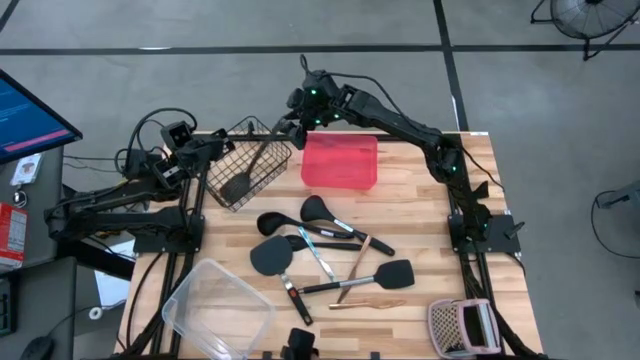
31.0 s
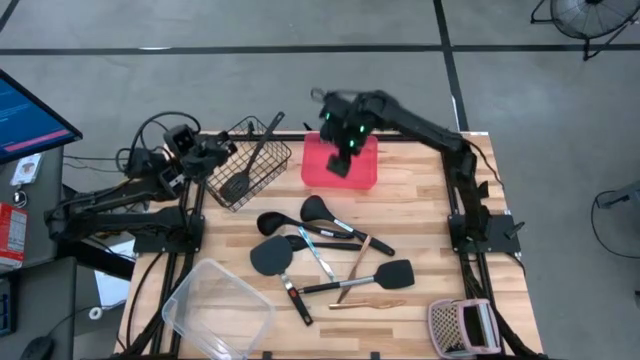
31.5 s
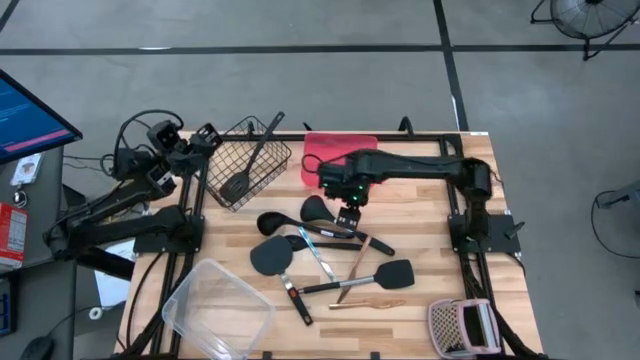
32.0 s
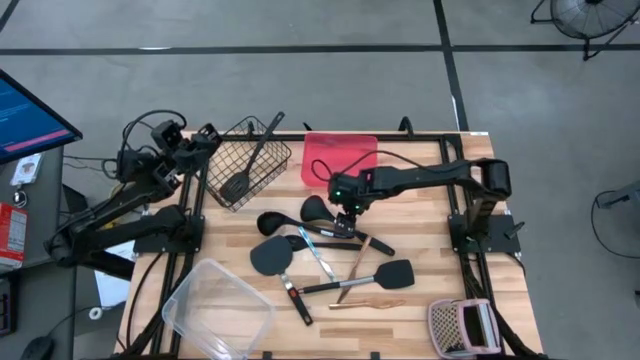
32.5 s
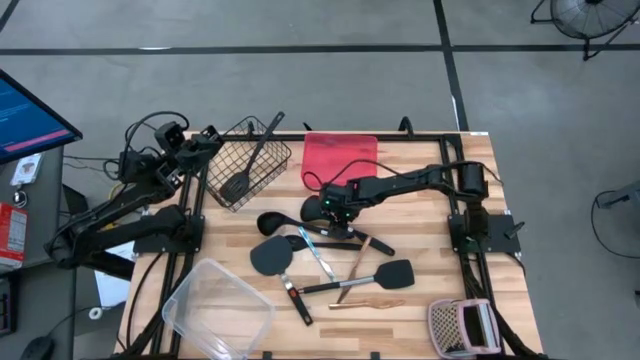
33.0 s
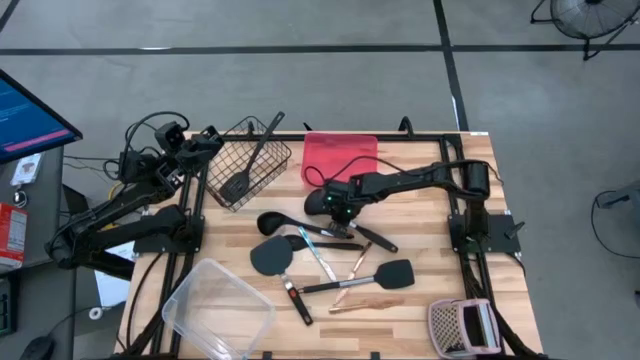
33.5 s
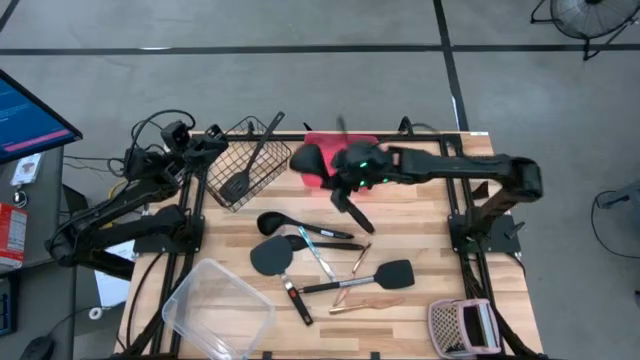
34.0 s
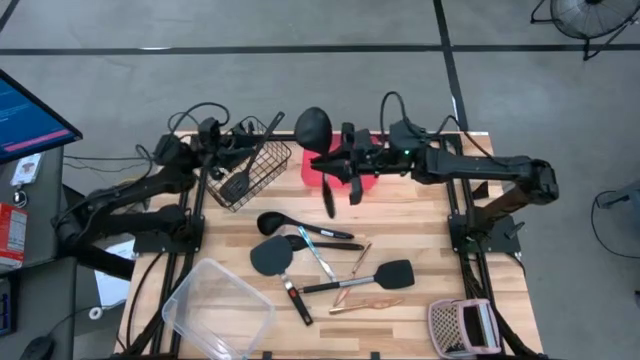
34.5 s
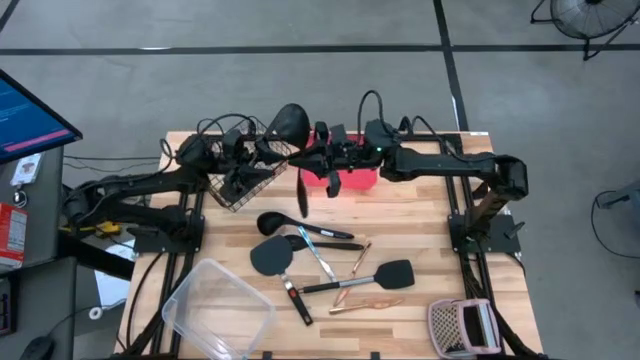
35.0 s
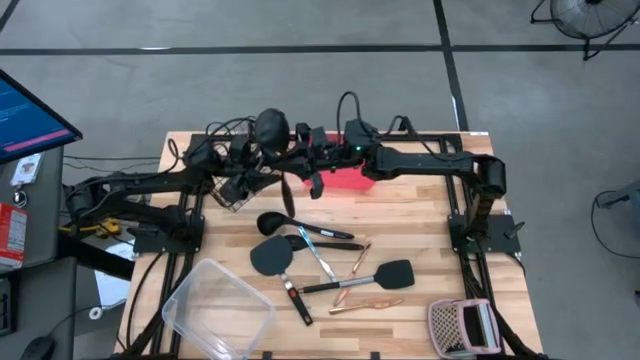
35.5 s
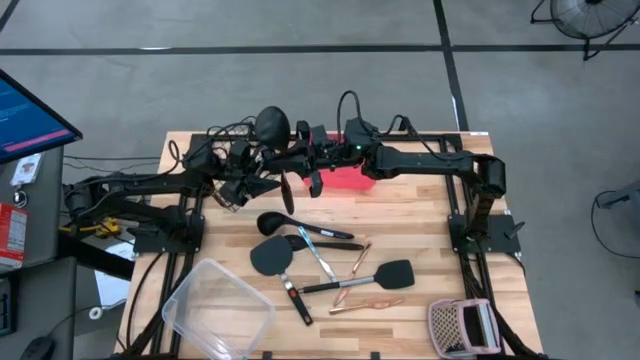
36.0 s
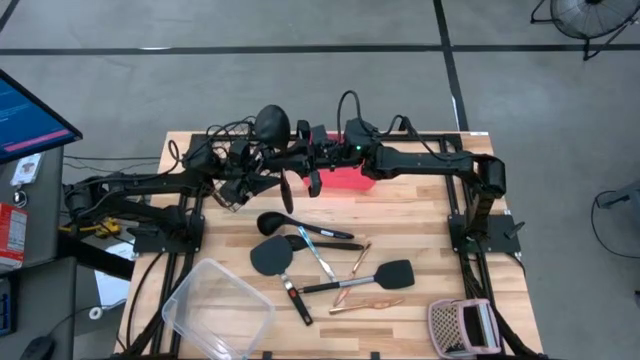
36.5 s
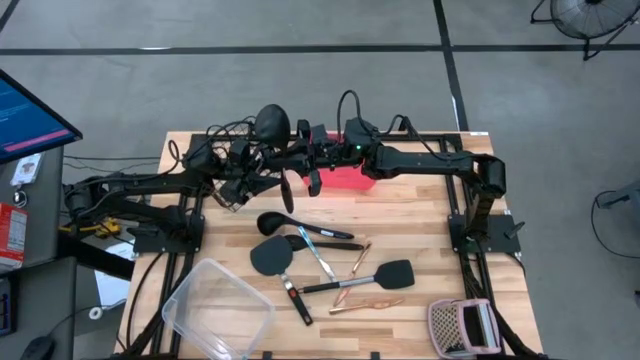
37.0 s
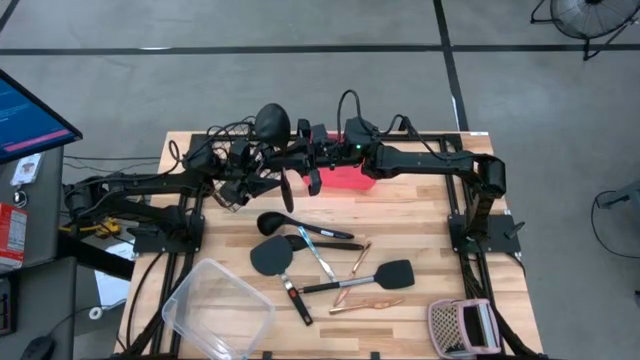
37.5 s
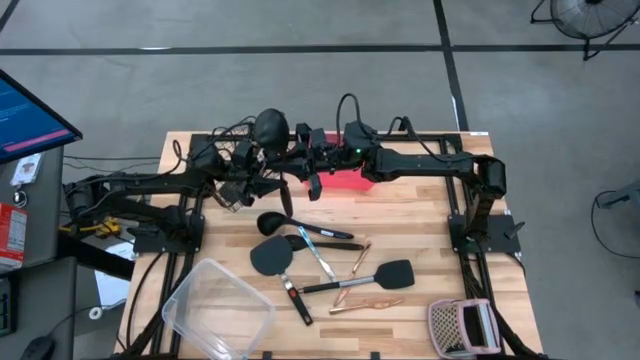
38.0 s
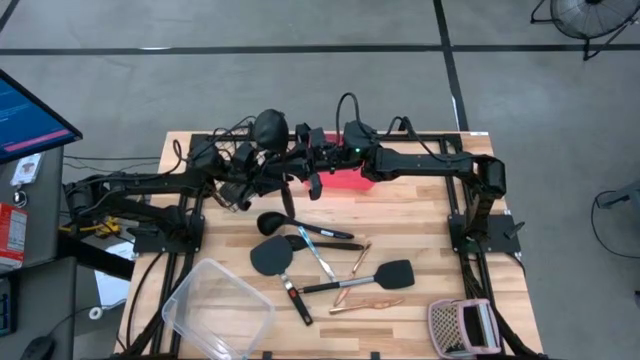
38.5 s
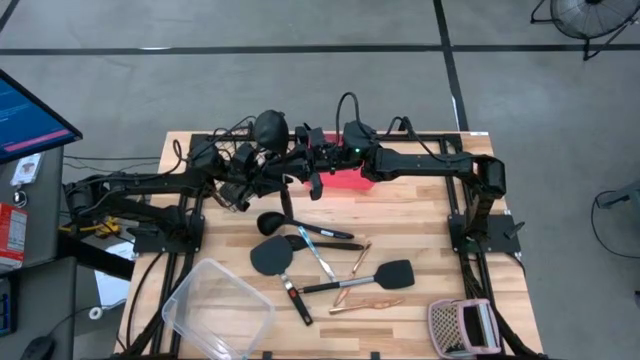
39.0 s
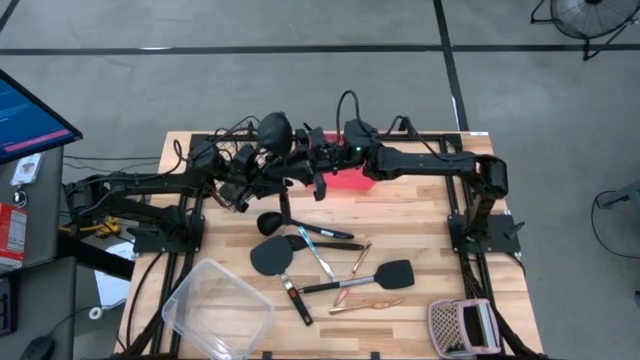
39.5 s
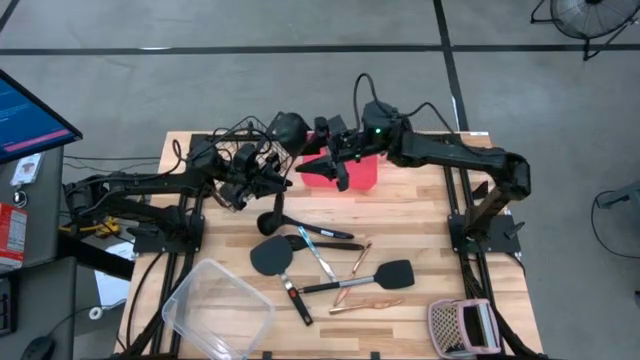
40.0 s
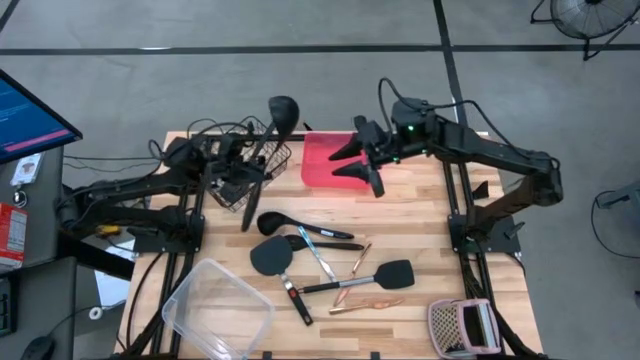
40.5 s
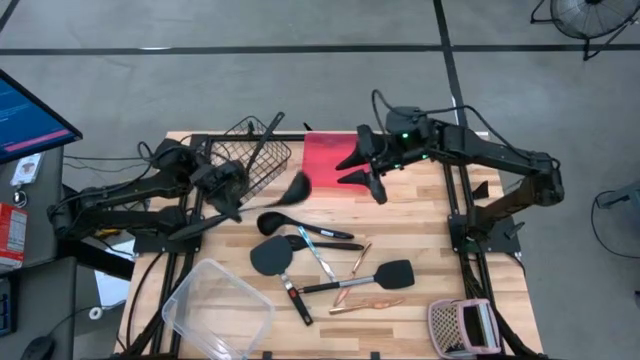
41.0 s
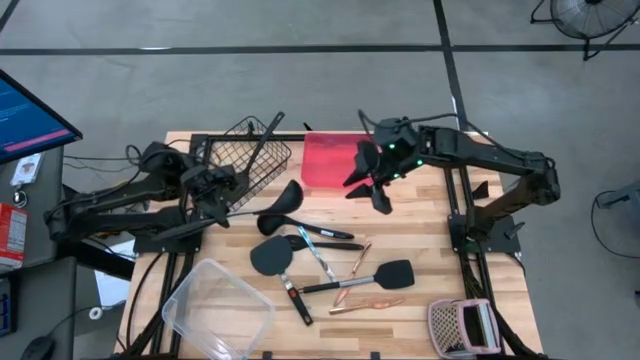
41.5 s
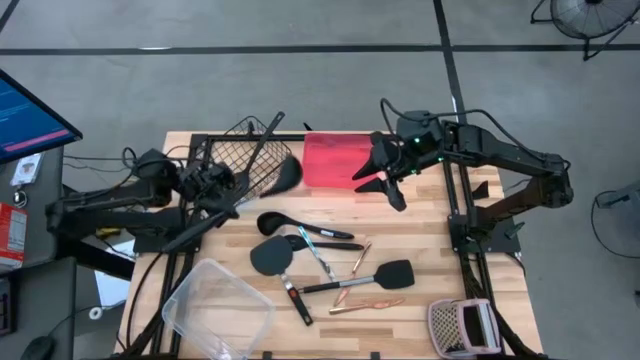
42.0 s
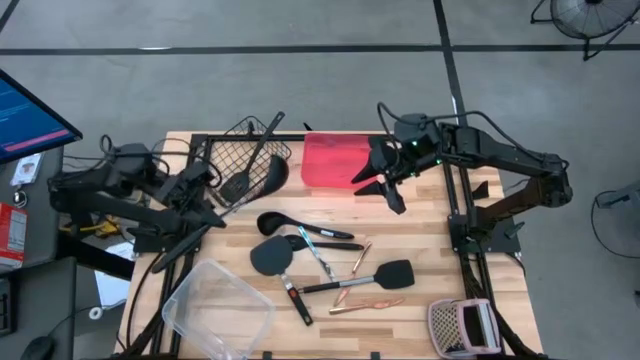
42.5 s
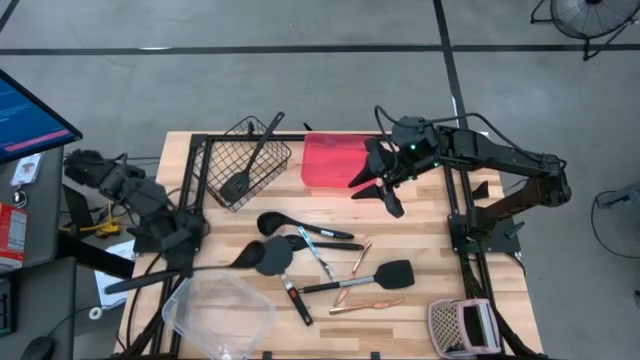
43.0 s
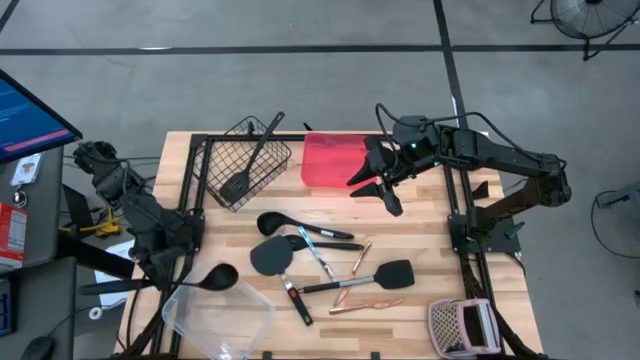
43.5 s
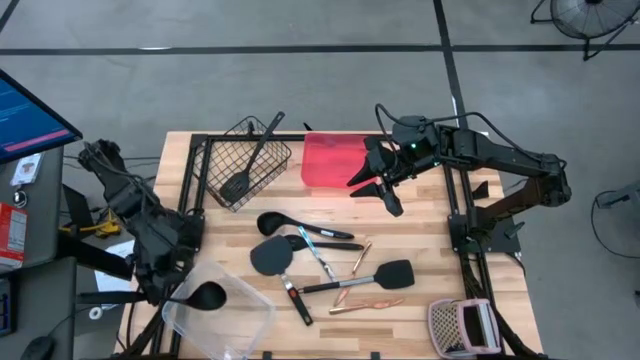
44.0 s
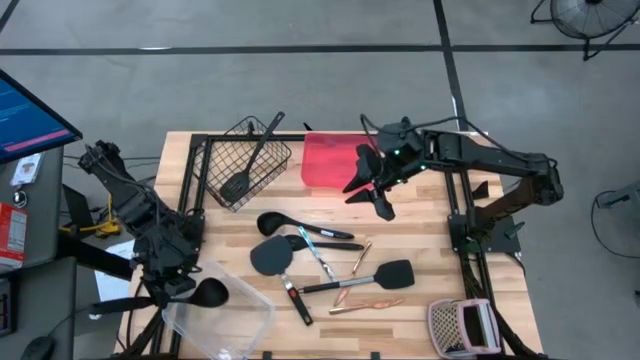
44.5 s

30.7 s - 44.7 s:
Task: Pick & Place Kitchen Items
Put the soup ladle into the white bin

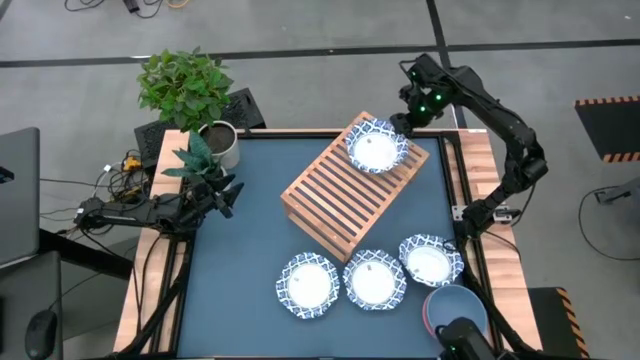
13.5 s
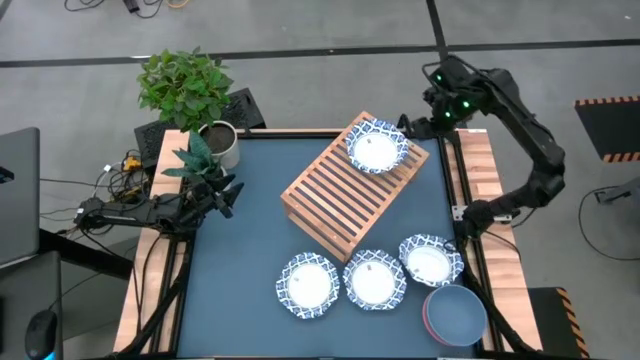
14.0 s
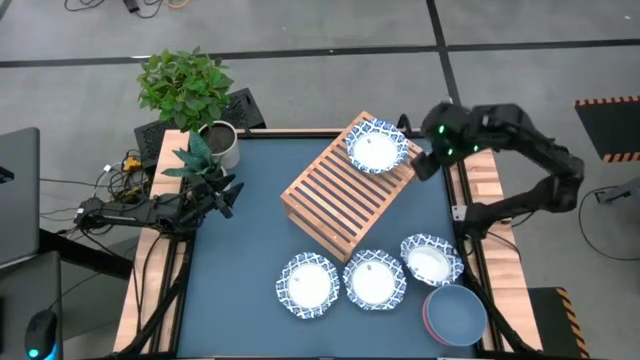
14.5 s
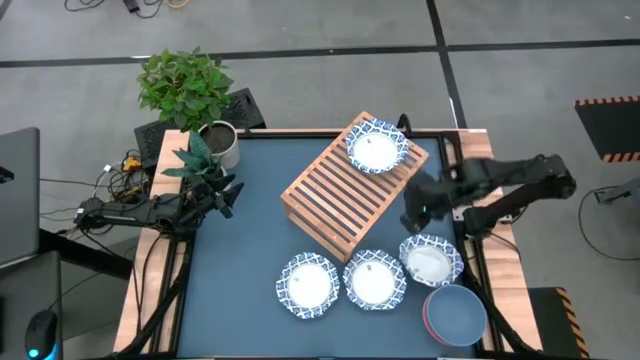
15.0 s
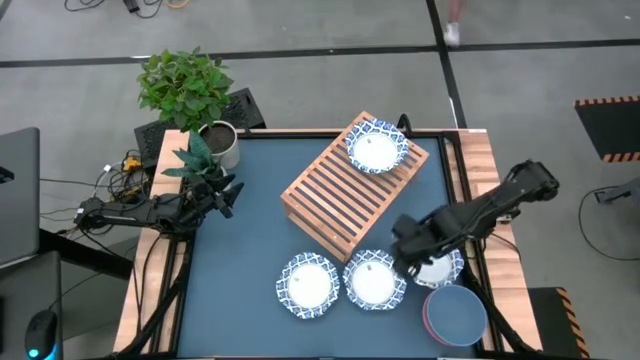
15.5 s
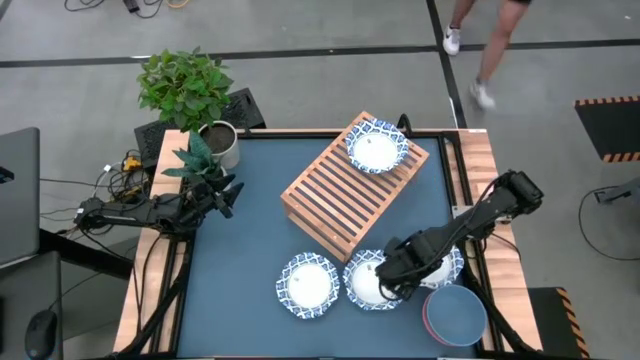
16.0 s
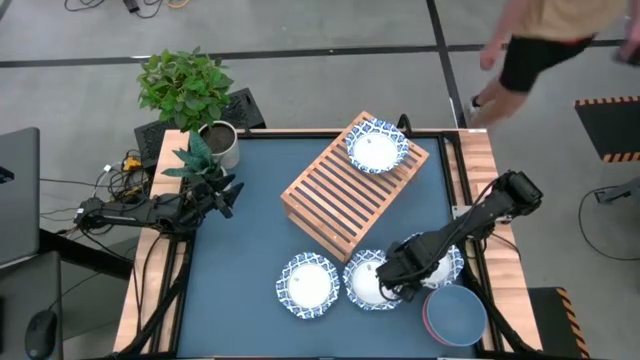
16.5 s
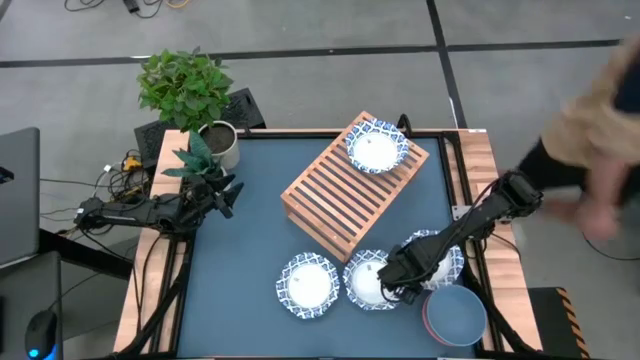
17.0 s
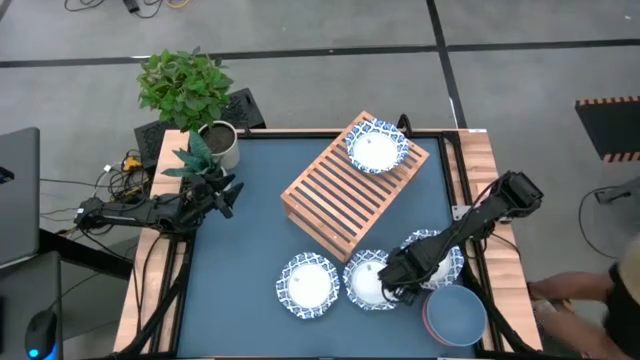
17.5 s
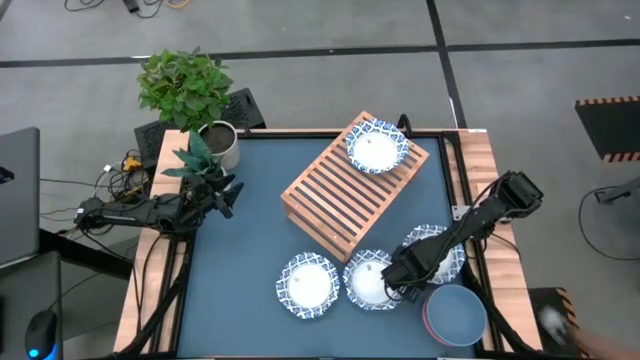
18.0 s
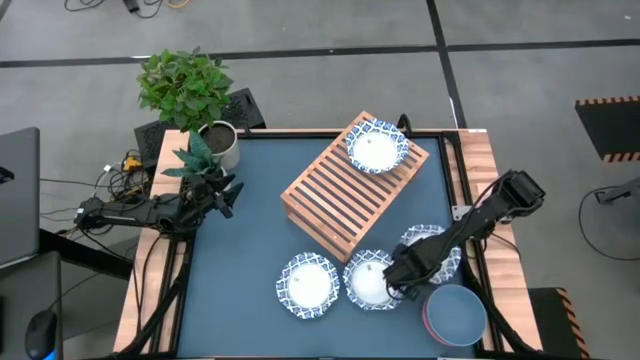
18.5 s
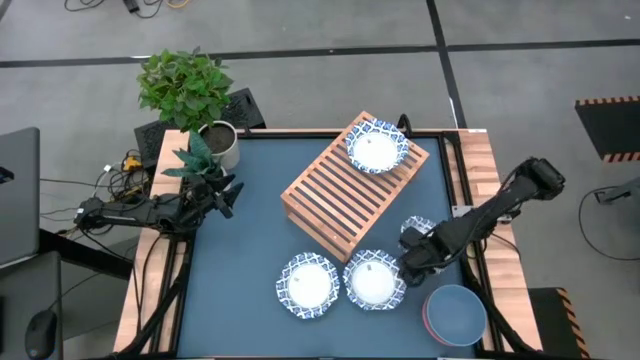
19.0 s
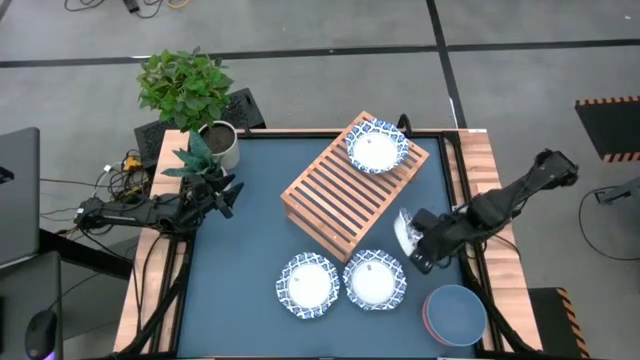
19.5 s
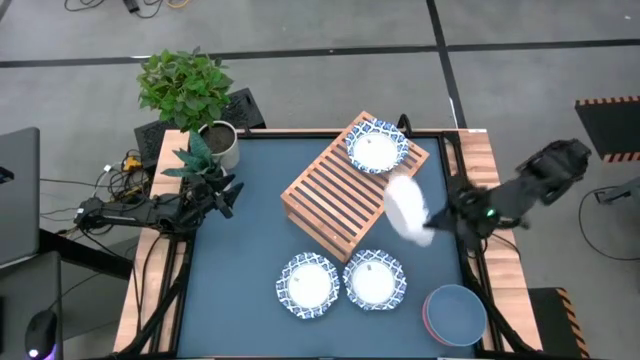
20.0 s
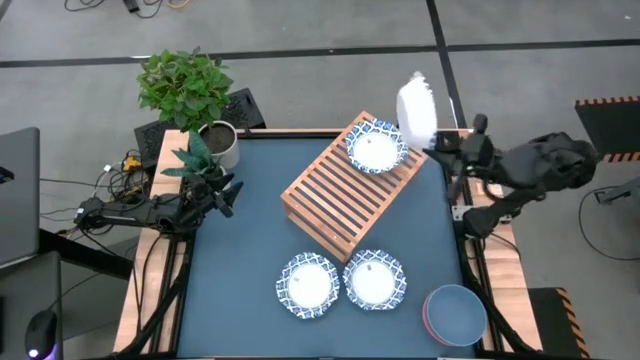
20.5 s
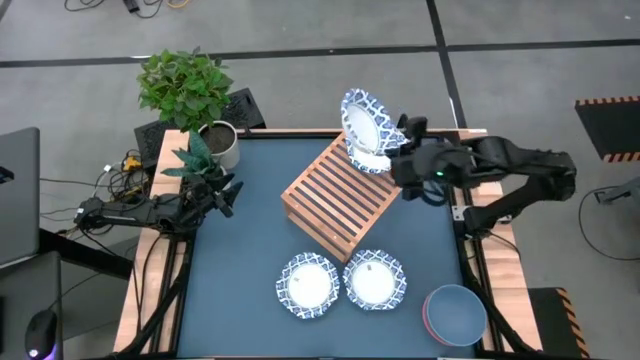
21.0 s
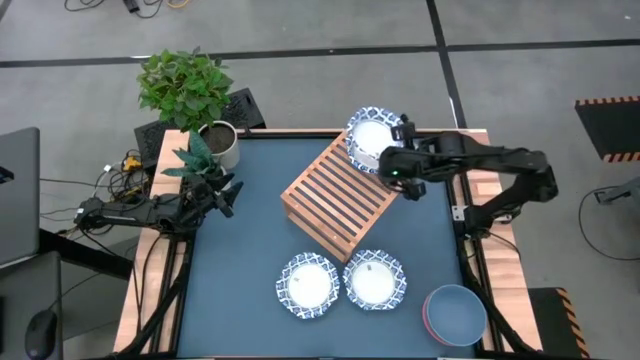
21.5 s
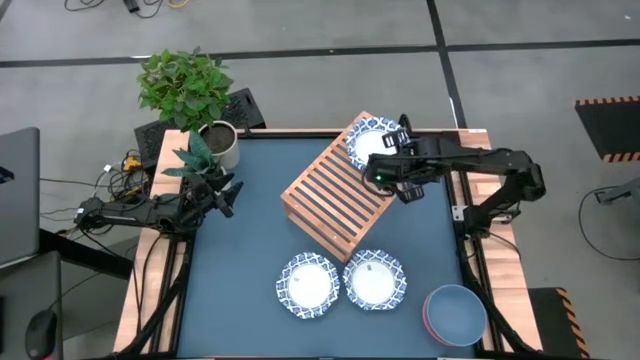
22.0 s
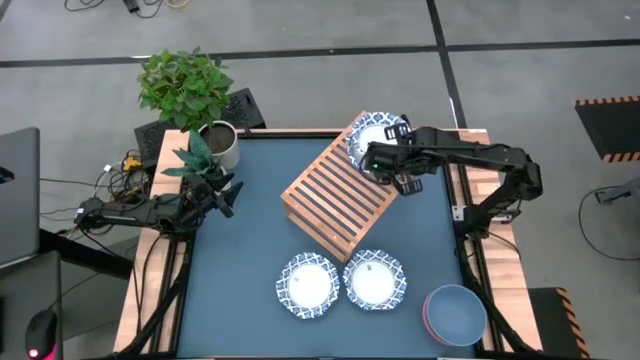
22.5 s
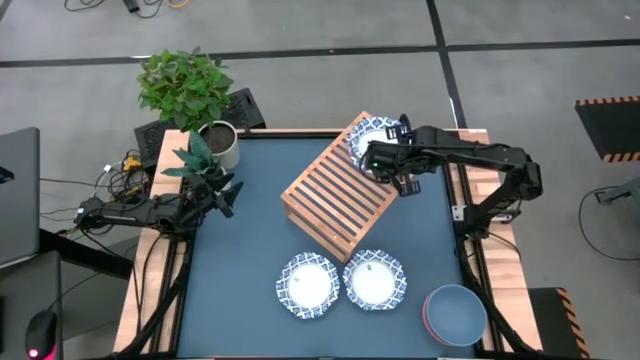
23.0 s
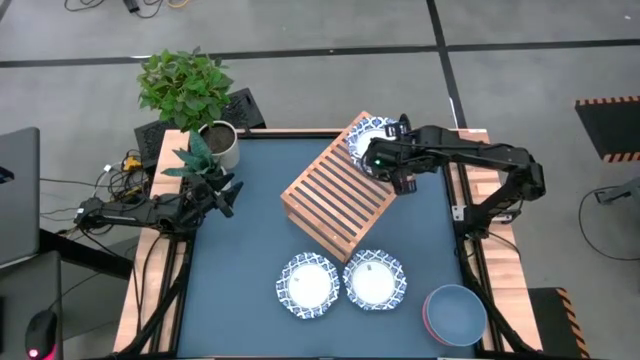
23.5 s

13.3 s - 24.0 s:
Task: Place and stack bowls onto a shelf
Stack the right white and blue patterned bowl on top of the other white and blue patterned bowl on the shelf
